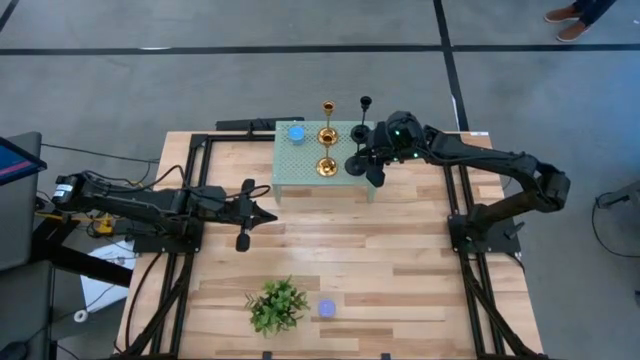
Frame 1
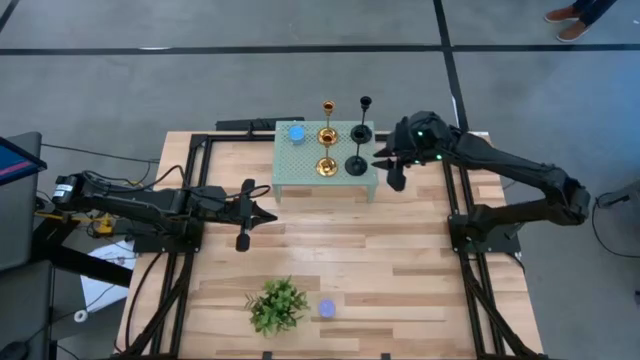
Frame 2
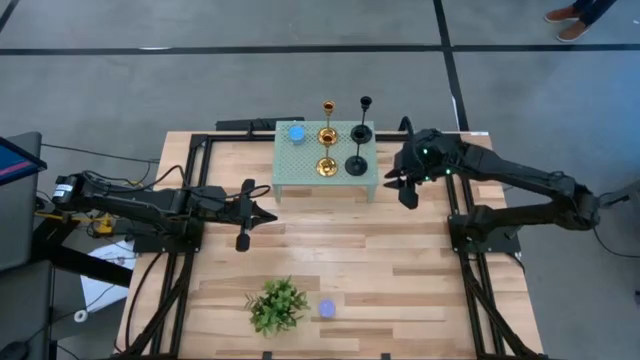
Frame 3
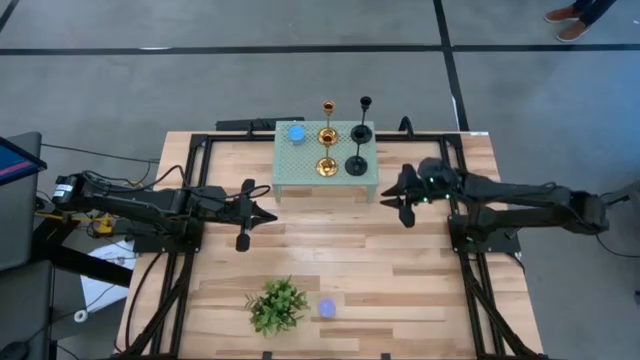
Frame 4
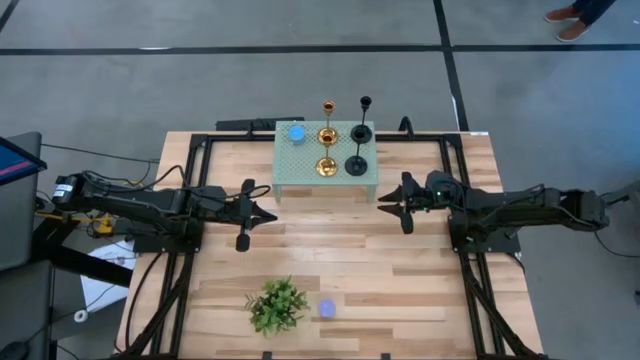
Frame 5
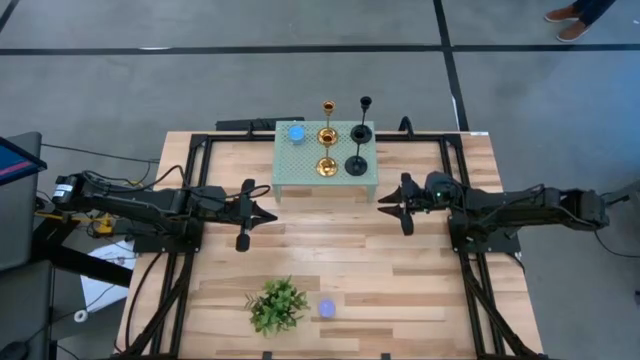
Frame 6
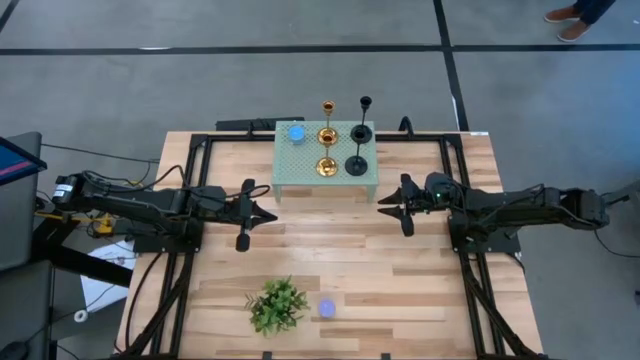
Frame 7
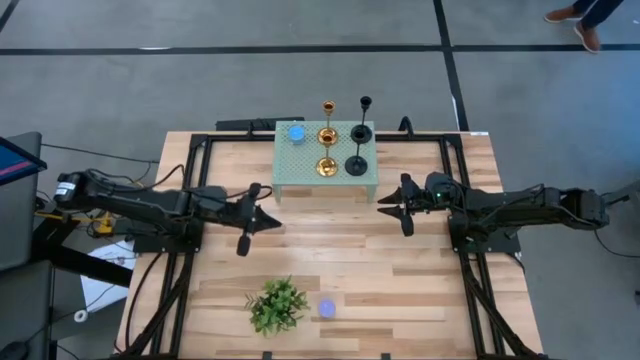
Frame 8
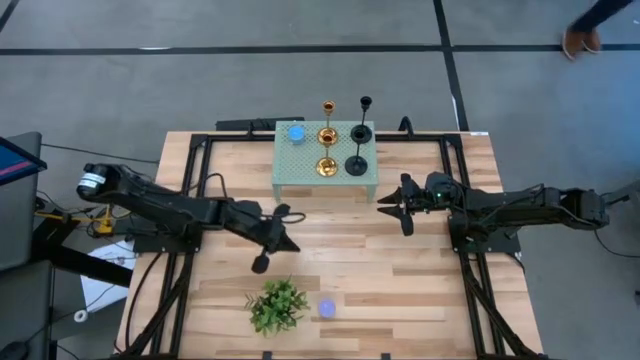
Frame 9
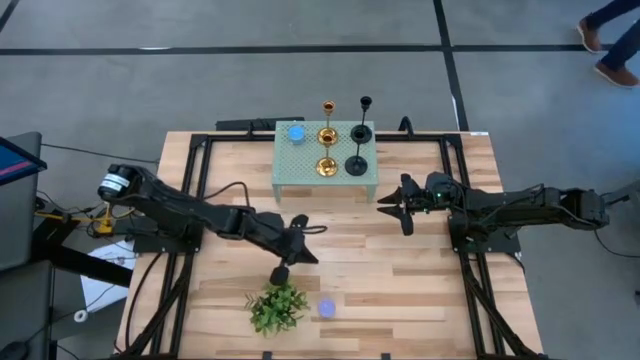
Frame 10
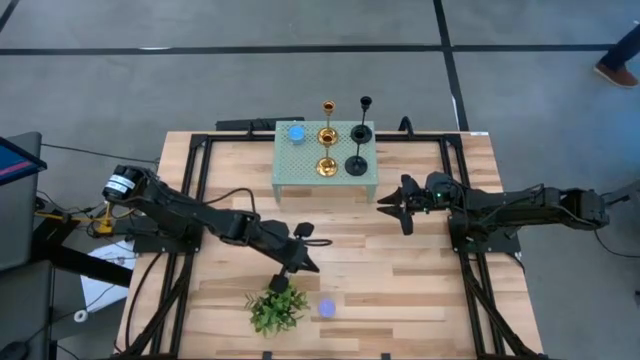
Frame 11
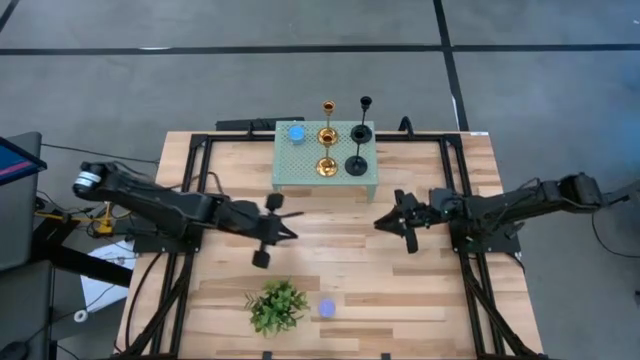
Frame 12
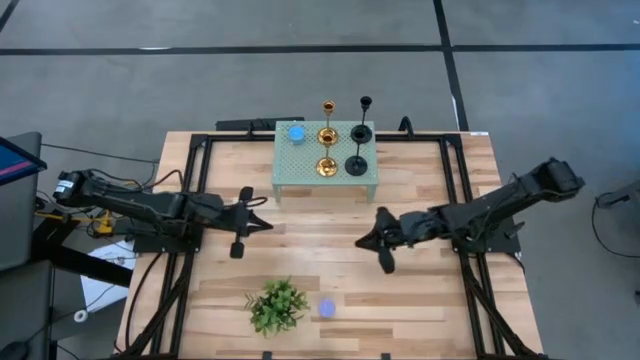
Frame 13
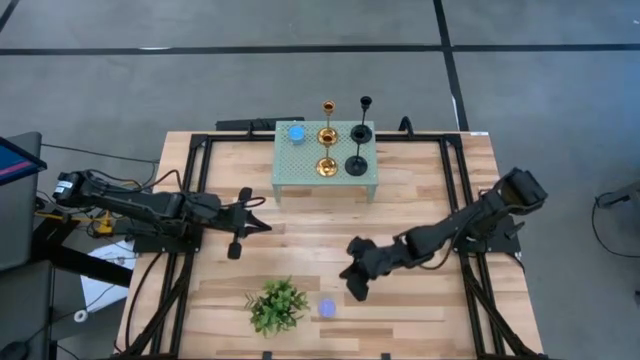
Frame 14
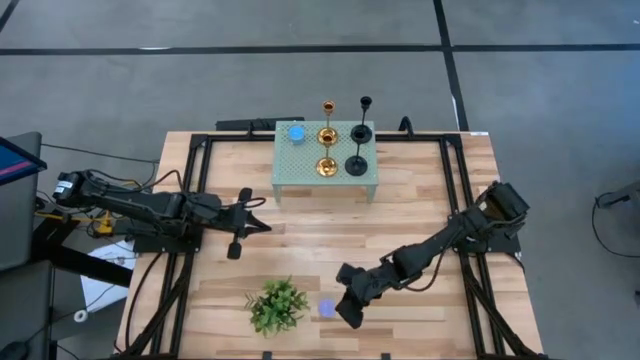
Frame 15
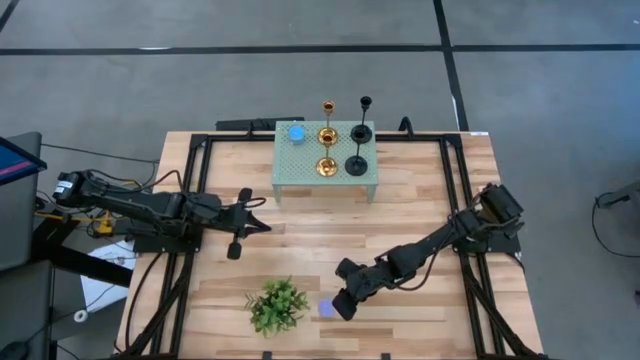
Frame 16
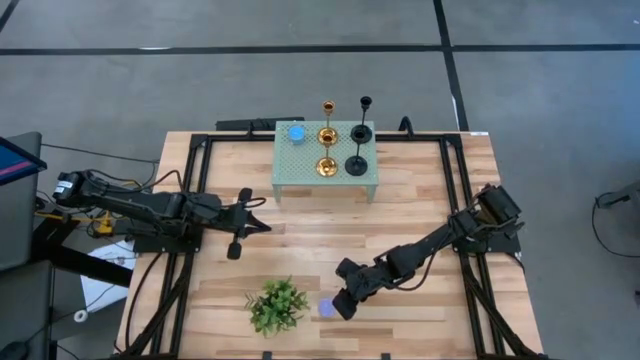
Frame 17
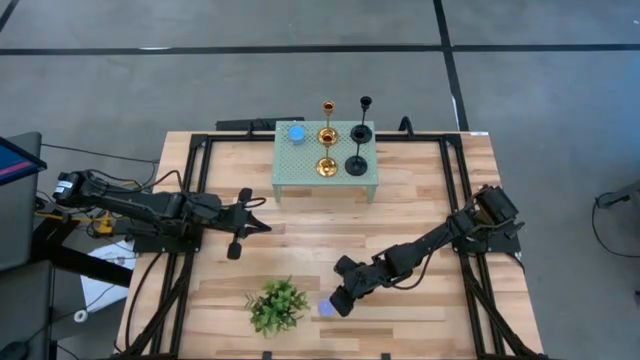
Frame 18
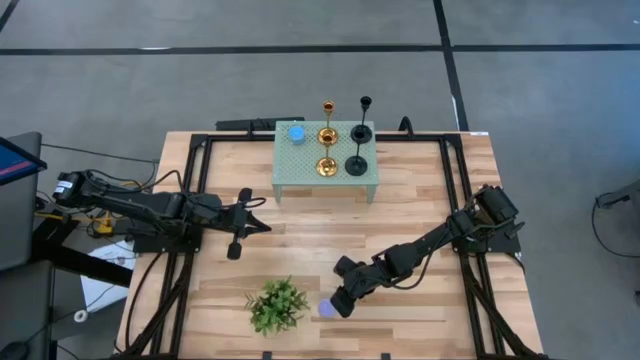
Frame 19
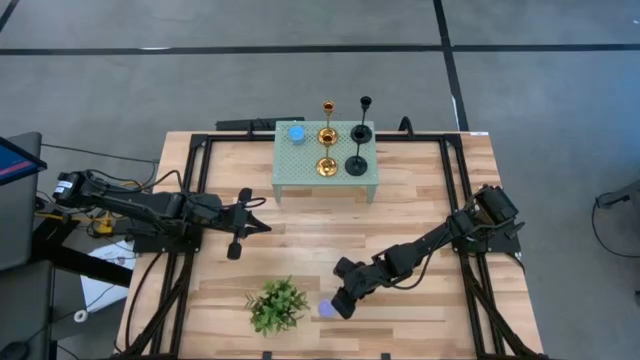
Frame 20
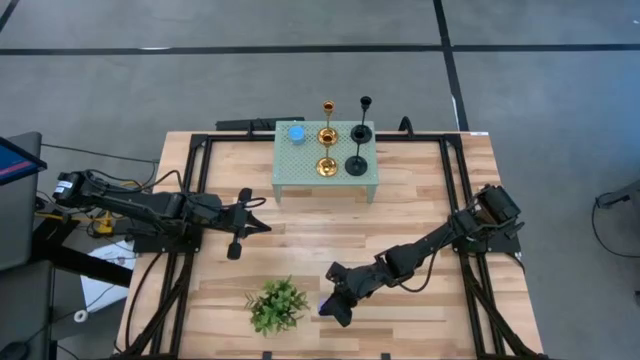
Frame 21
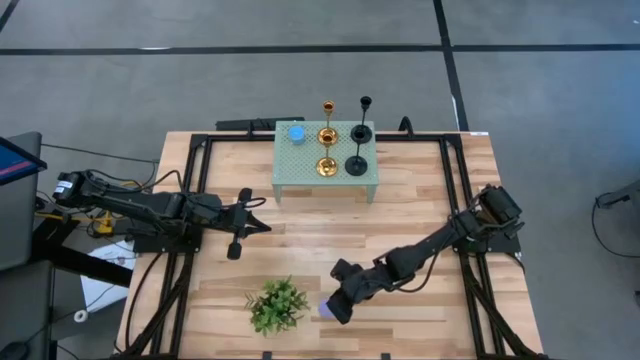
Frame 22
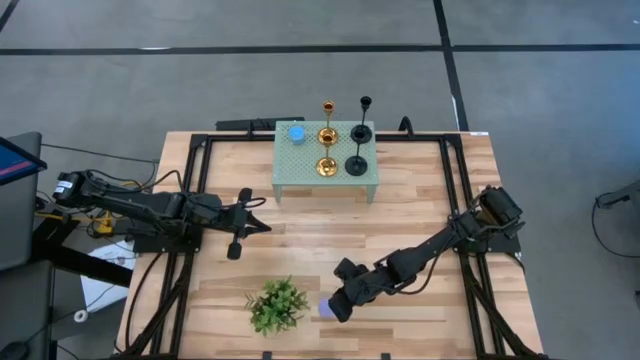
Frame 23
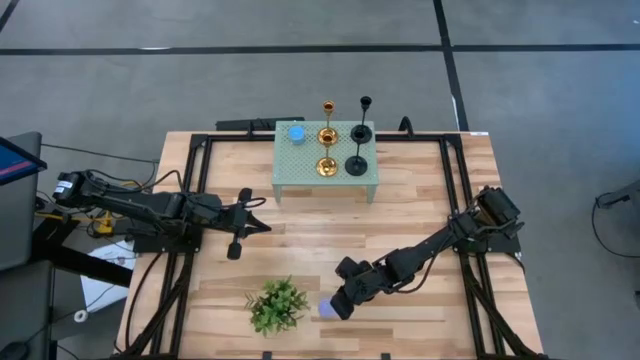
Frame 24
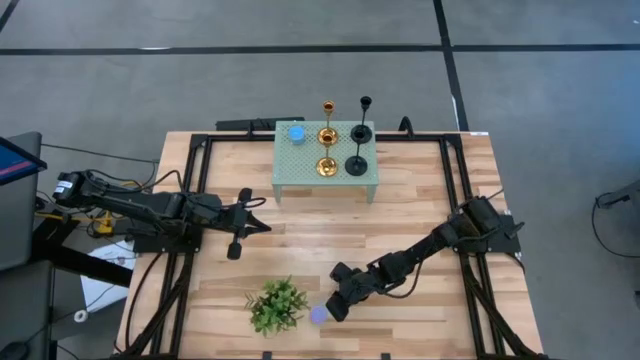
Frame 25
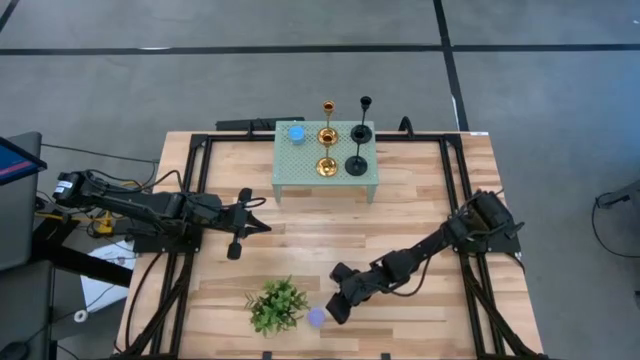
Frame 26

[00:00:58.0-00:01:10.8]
Task: Pick & Place candle stick holders
Put the violet candle on the shelf

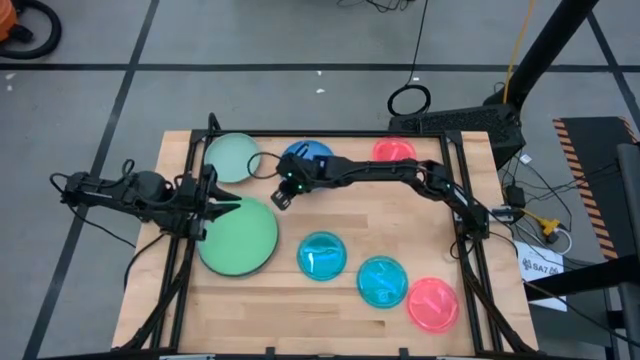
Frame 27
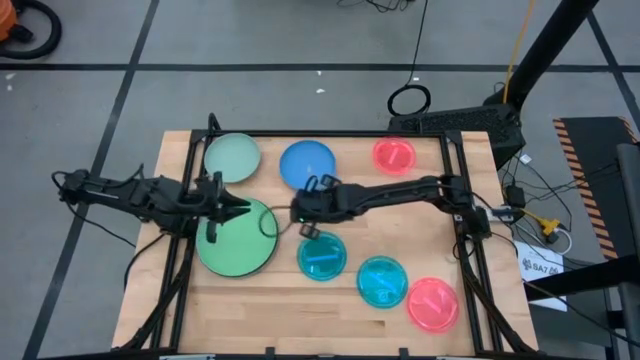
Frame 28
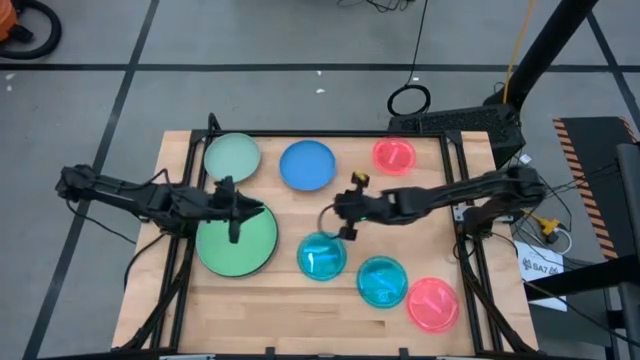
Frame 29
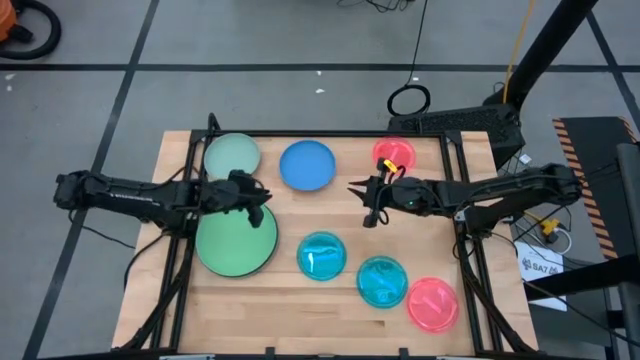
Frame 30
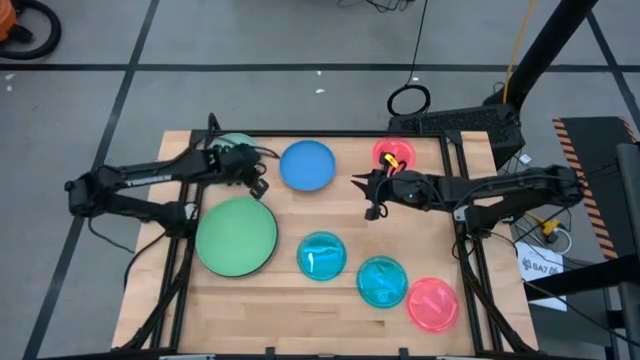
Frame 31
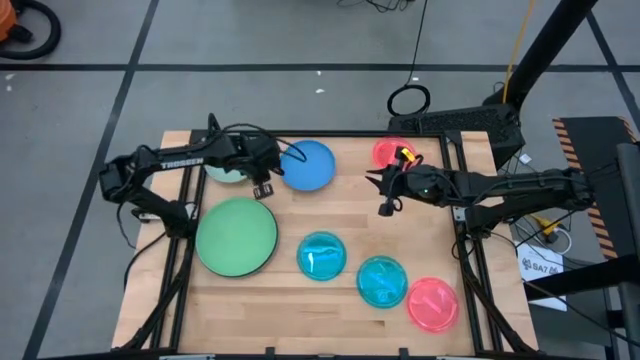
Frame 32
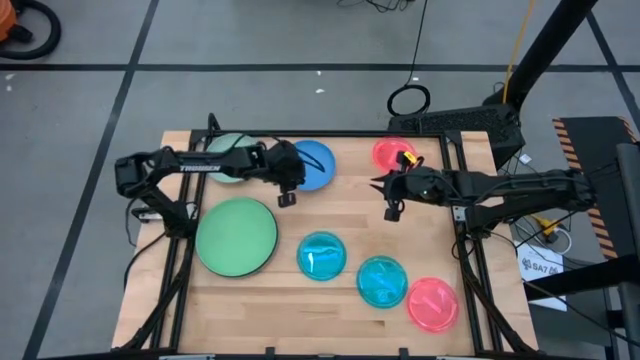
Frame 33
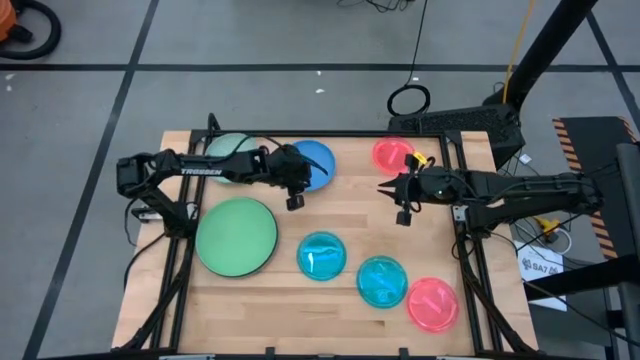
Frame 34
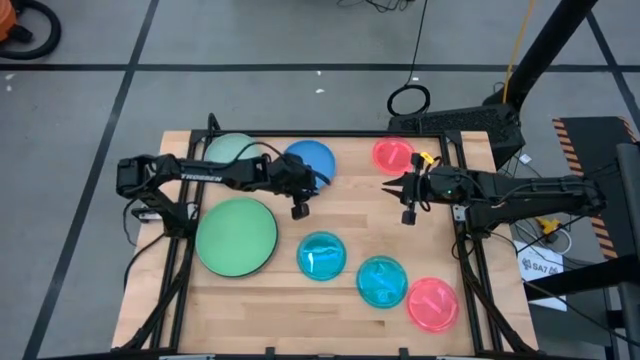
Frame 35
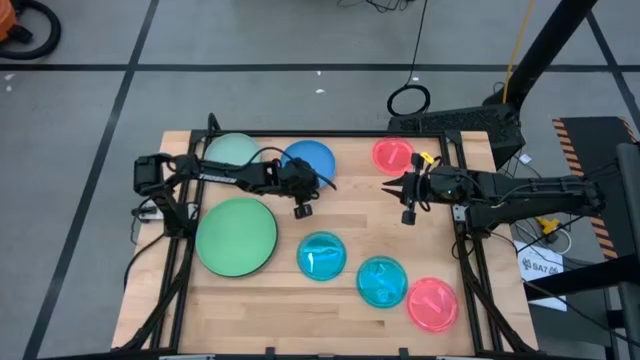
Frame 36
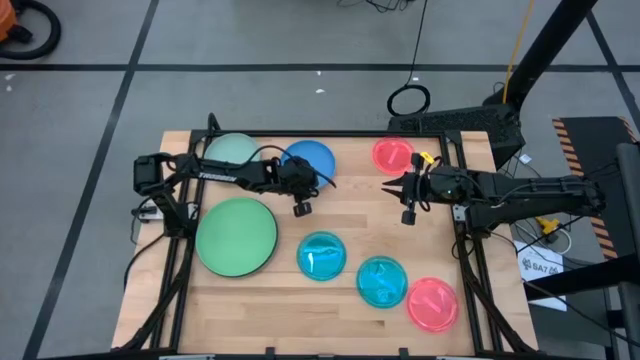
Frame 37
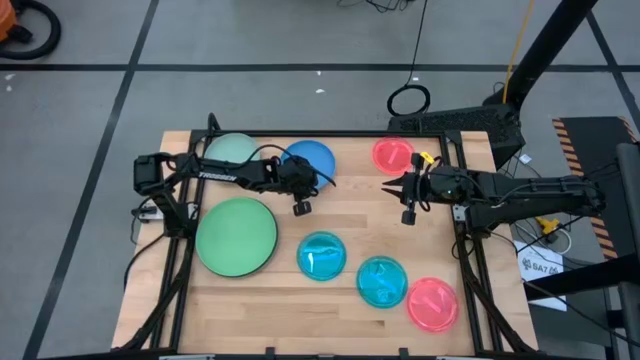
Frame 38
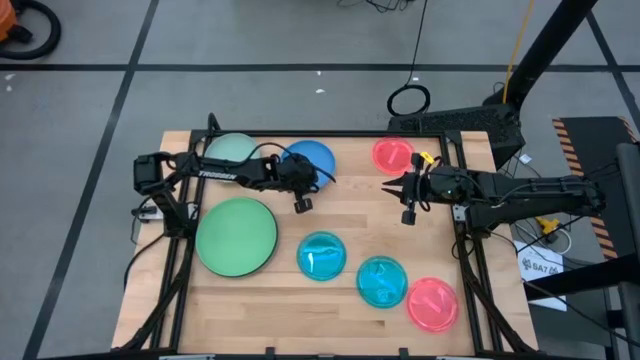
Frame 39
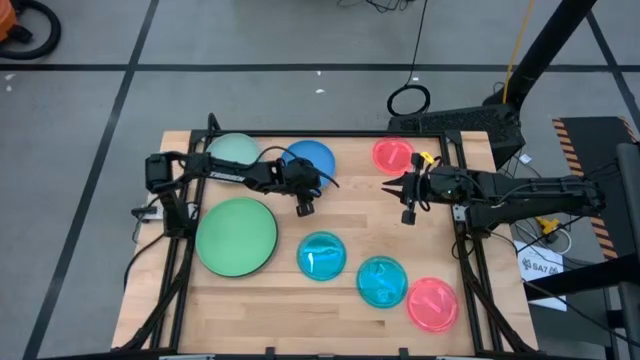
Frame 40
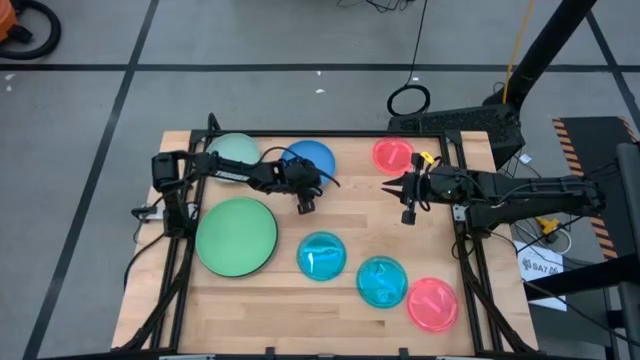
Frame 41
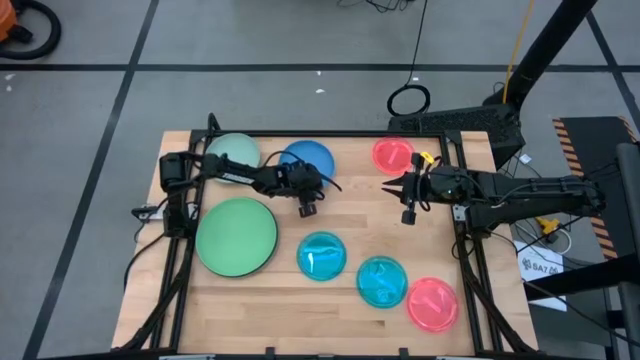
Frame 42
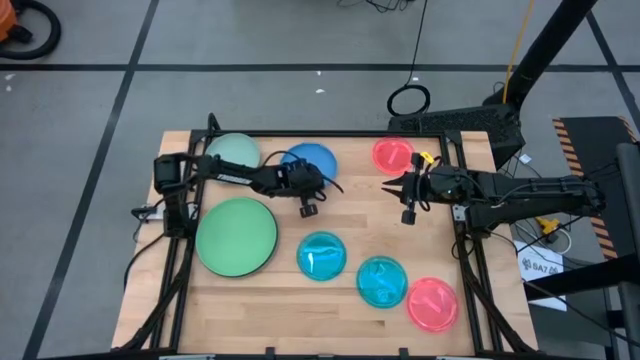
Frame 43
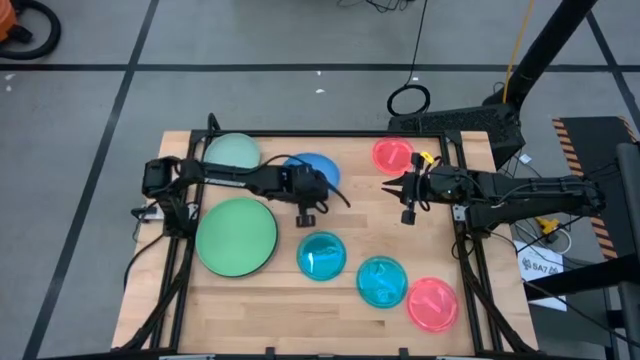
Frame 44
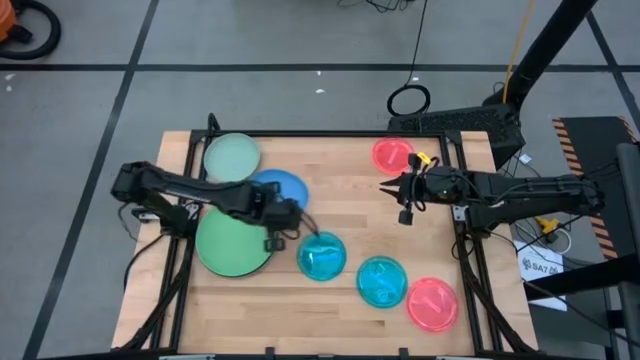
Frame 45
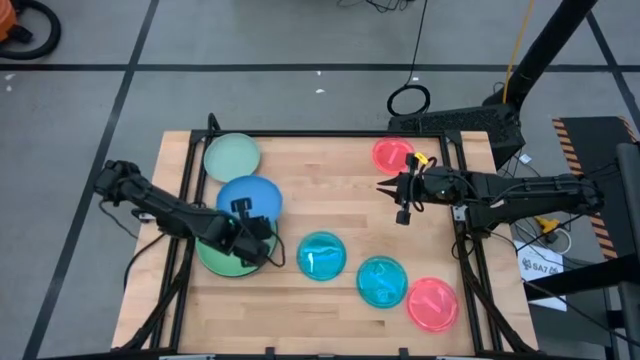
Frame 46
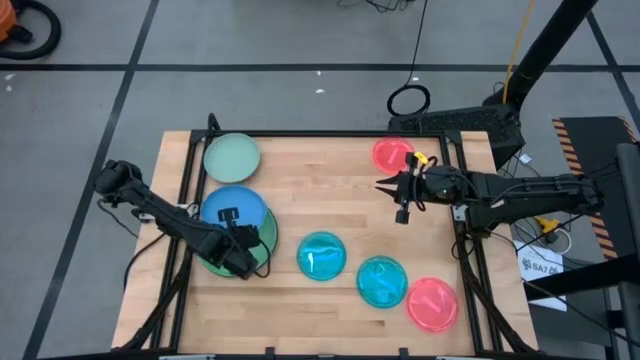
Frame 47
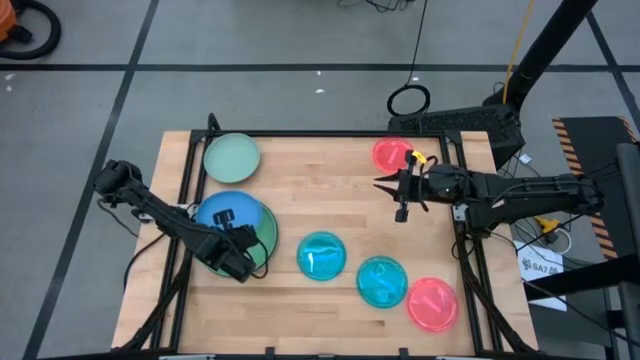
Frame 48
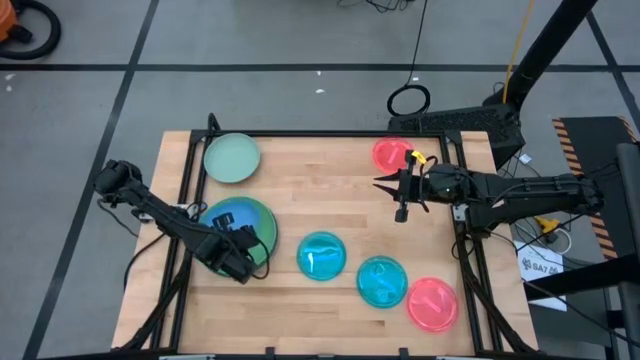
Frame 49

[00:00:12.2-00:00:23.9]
Task: Stack plastic plates
Stack the blue plate on top of the green plate
